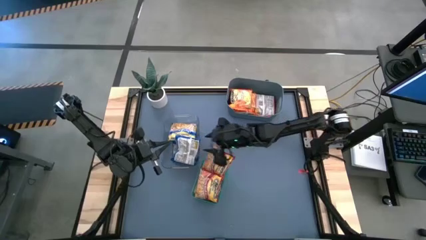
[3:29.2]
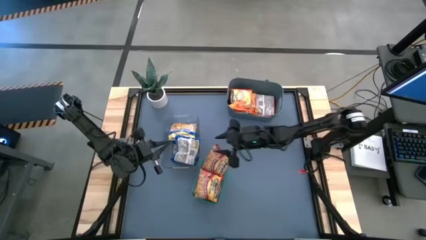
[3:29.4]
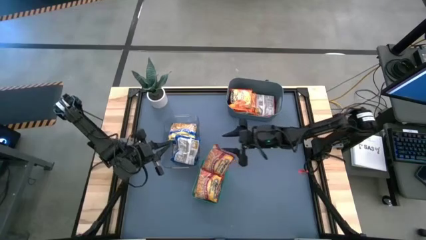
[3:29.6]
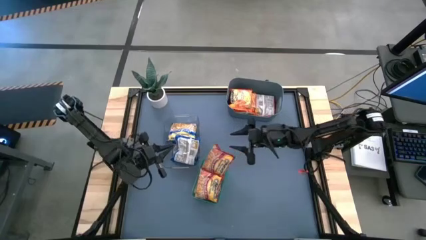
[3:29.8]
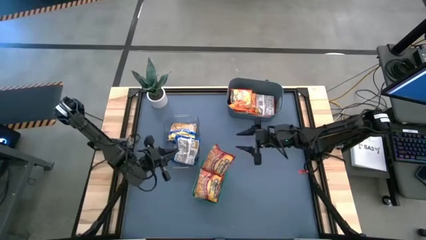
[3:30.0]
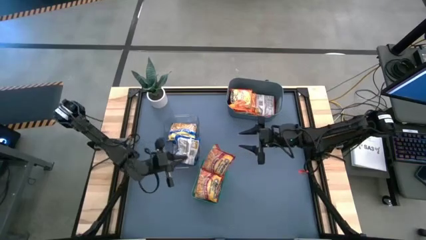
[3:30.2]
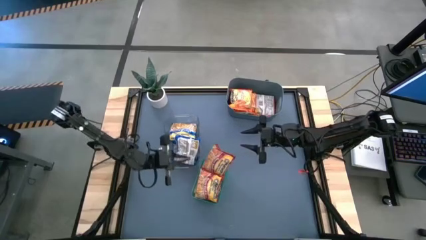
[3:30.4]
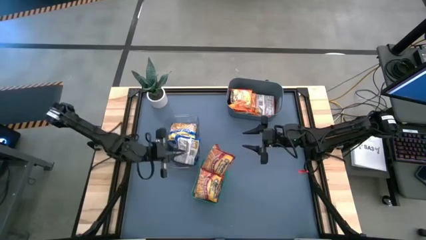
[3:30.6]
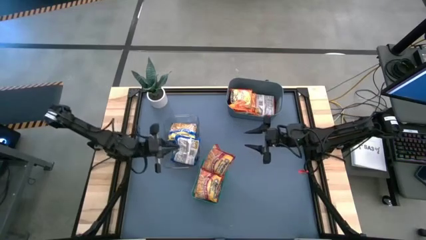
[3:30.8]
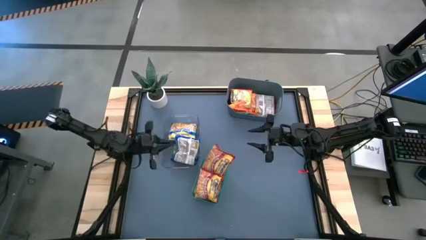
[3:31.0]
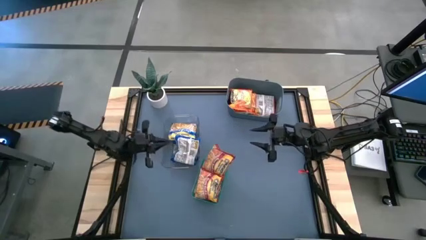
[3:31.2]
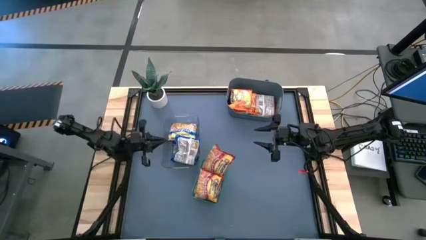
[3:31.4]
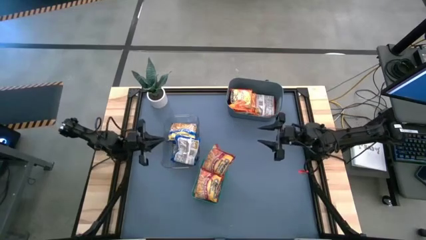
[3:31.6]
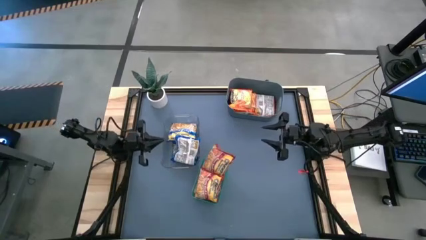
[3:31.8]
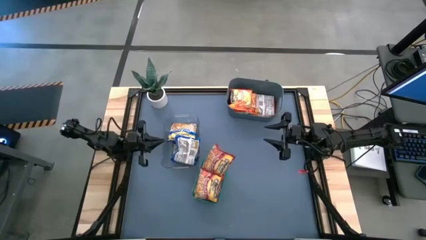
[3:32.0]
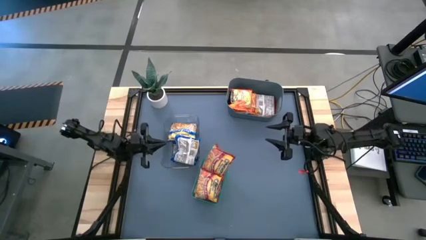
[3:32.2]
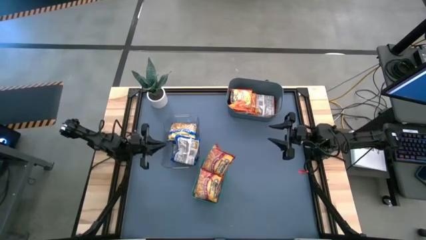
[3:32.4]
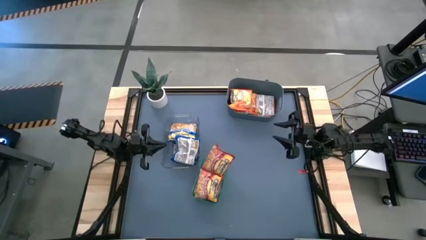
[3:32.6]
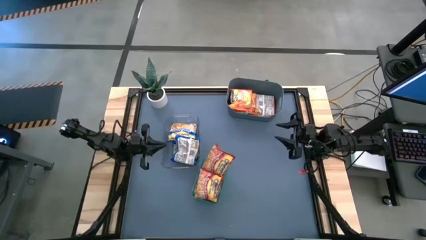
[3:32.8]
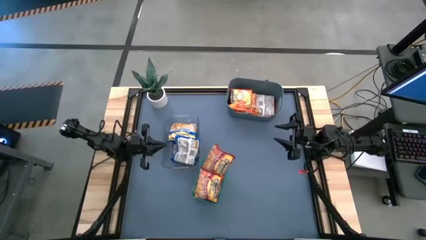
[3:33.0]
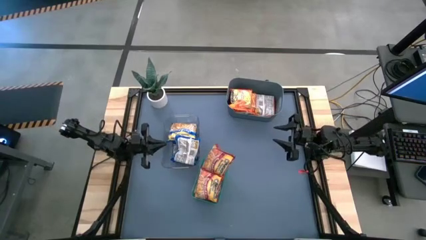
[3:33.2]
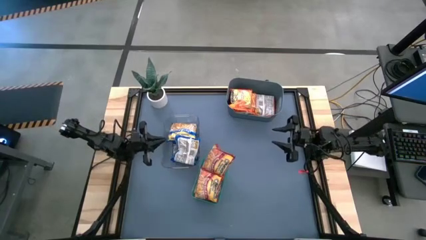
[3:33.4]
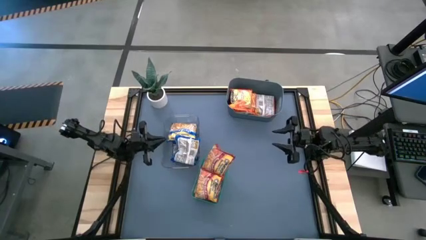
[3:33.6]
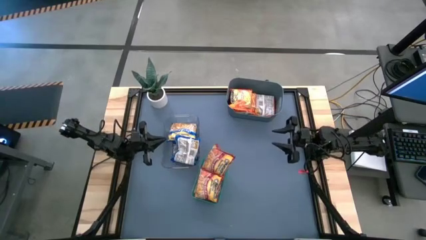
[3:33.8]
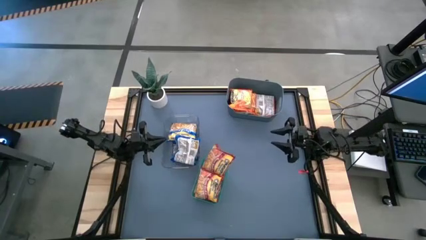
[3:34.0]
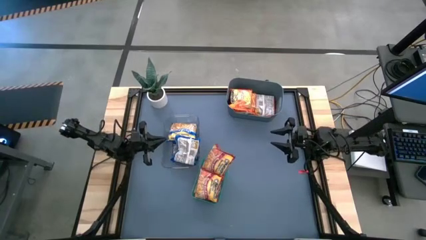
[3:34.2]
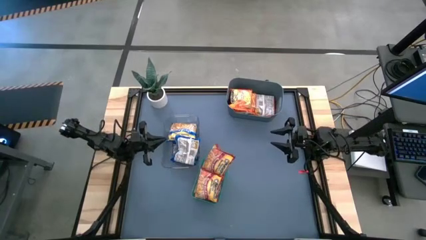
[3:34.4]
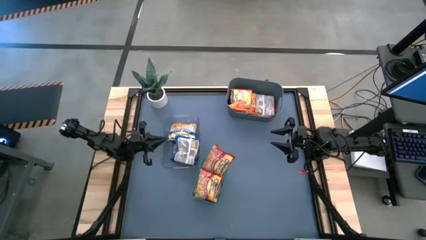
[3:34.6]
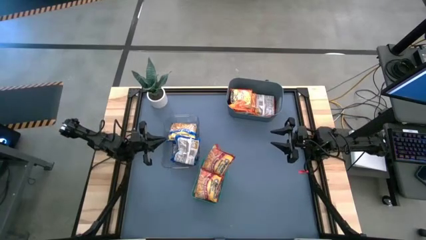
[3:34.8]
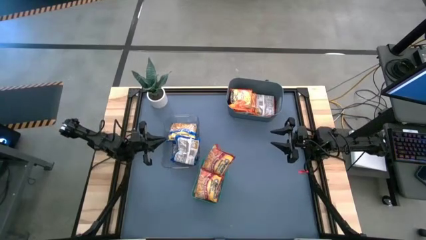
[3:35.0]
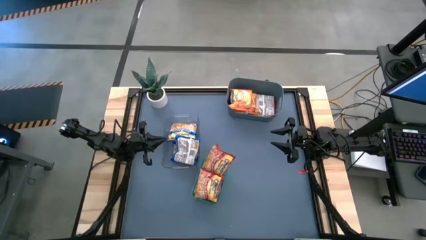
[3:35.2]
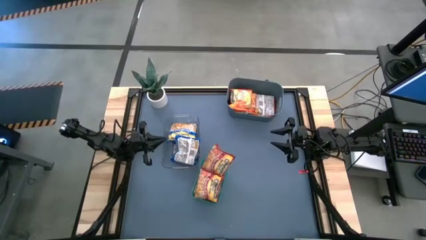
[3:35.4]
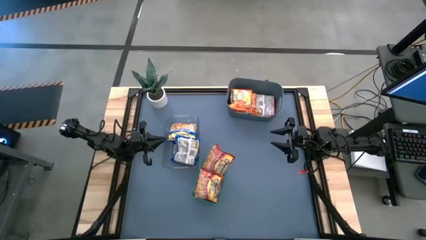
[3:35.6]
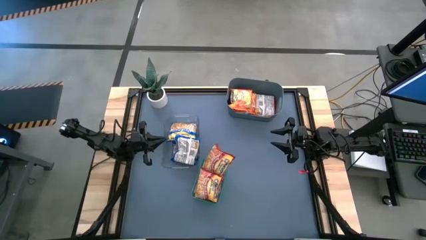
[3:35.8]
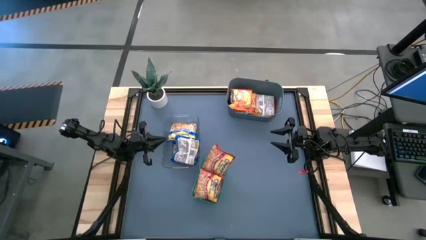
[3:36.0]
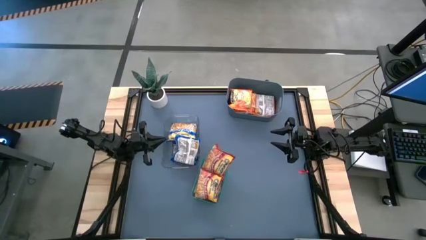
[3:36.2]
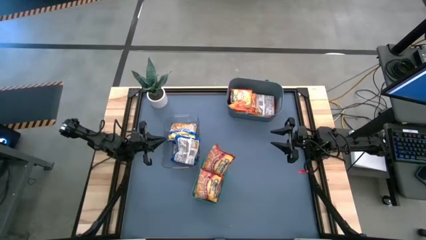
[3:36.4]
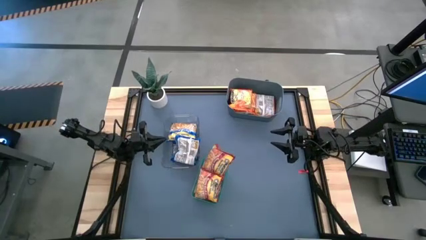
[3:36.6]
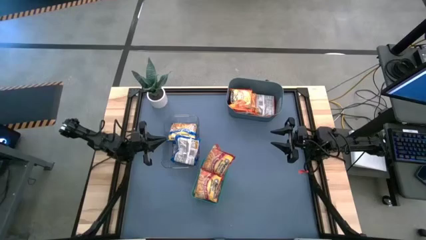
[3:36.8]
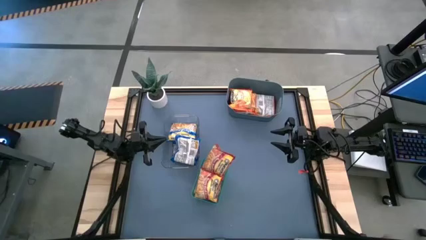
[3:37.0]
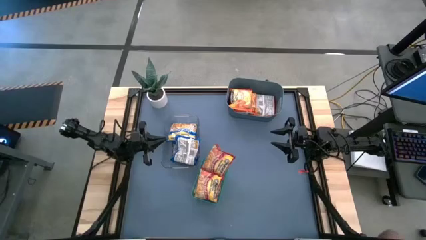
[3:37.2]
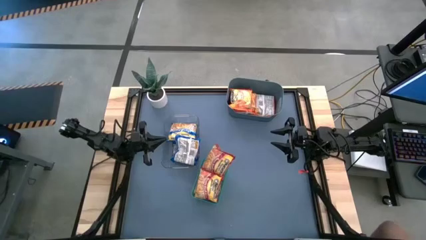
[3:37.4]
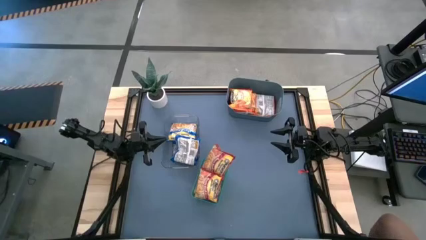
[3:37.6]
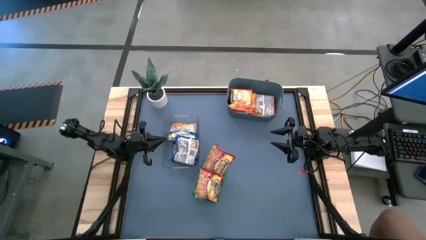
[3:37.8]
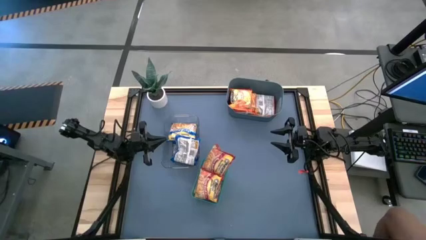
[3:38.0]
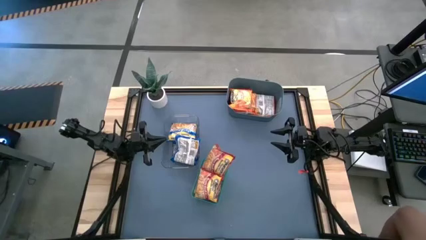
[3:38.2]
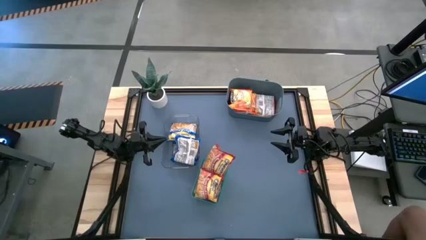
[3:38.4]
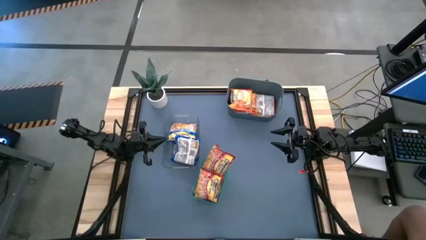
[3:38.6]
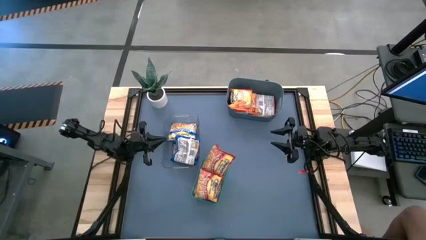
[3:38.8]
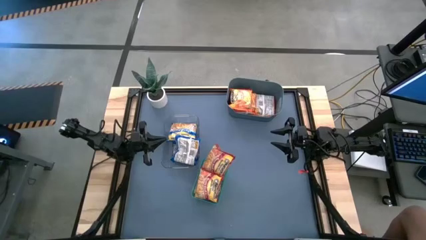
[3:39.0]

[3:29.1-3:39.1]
Task: Sort Maruchan noodles
Return to Home Position

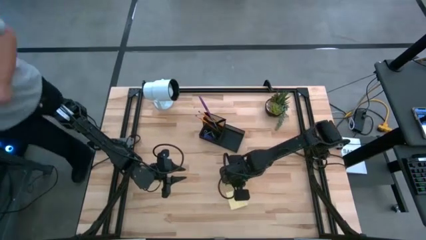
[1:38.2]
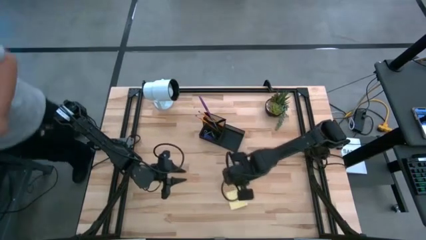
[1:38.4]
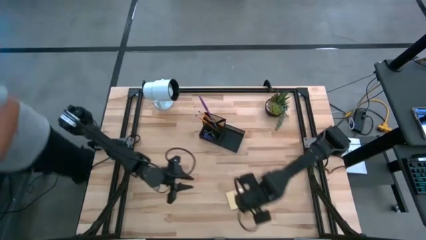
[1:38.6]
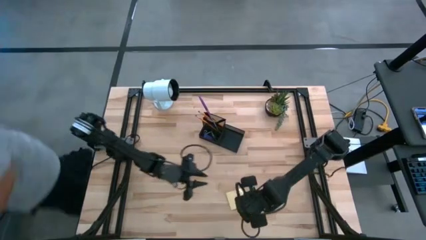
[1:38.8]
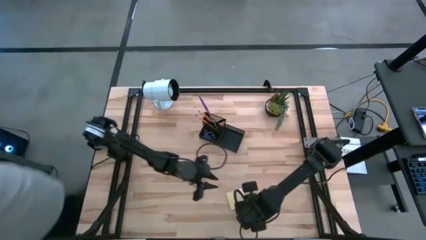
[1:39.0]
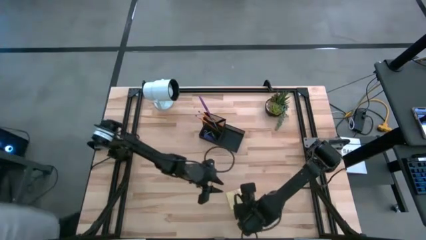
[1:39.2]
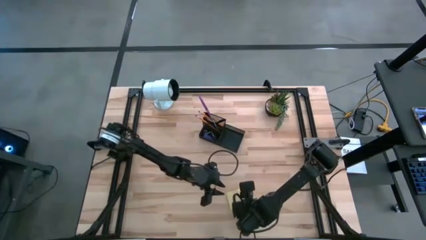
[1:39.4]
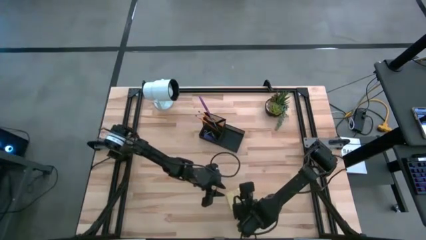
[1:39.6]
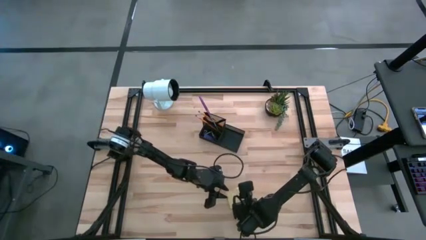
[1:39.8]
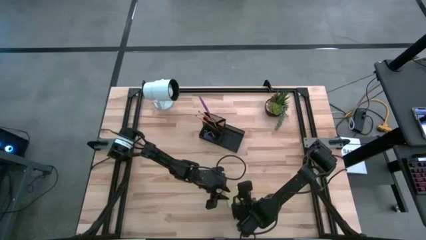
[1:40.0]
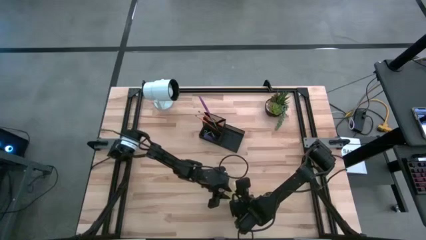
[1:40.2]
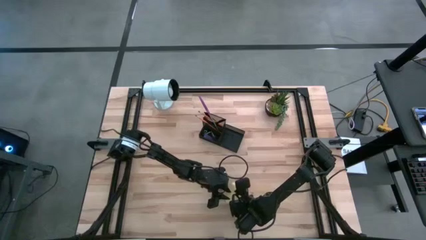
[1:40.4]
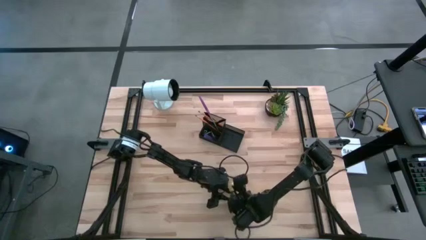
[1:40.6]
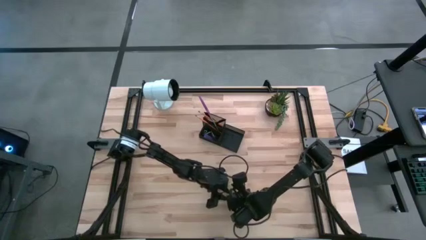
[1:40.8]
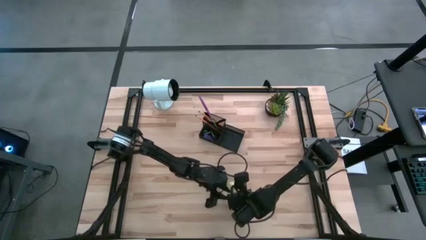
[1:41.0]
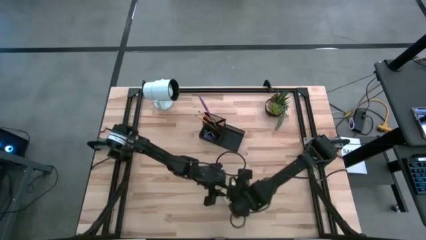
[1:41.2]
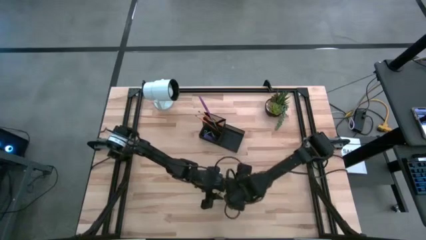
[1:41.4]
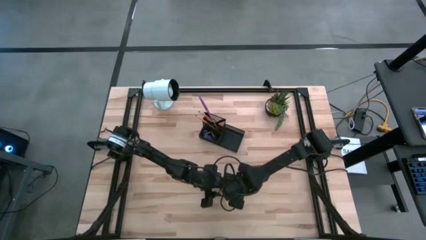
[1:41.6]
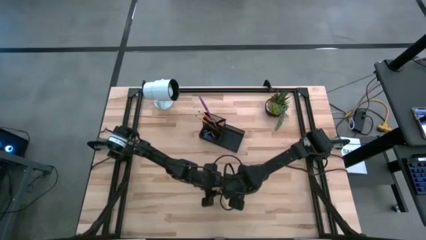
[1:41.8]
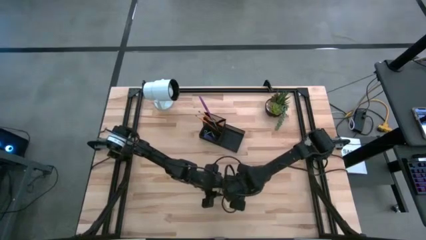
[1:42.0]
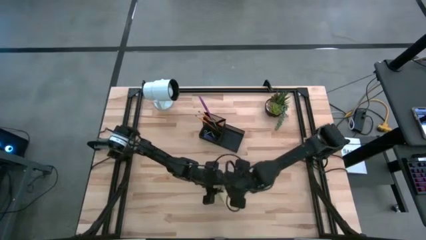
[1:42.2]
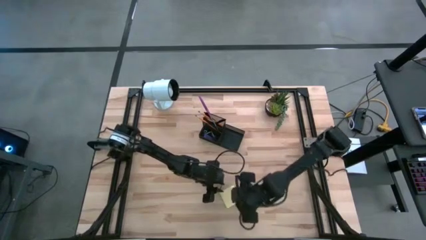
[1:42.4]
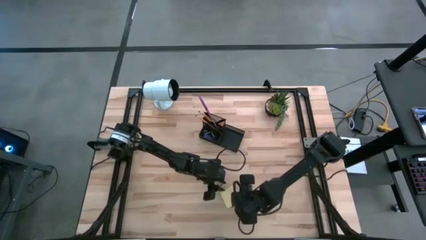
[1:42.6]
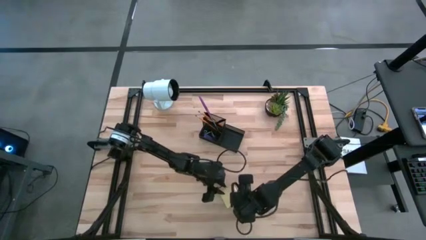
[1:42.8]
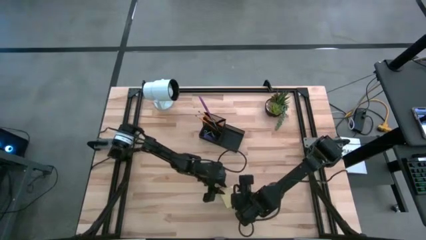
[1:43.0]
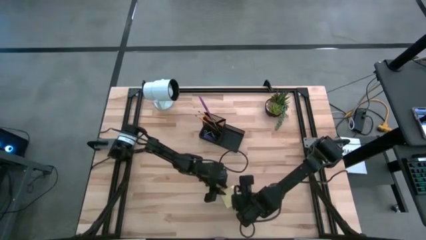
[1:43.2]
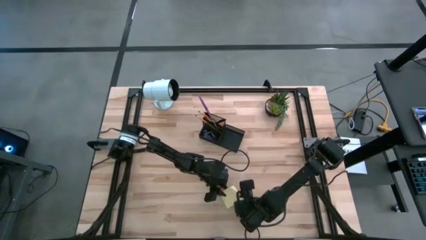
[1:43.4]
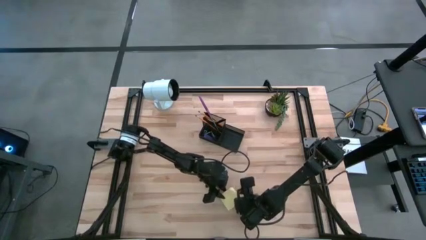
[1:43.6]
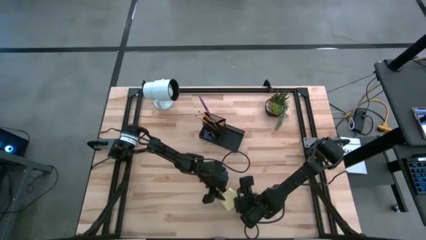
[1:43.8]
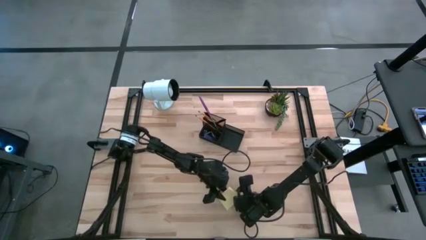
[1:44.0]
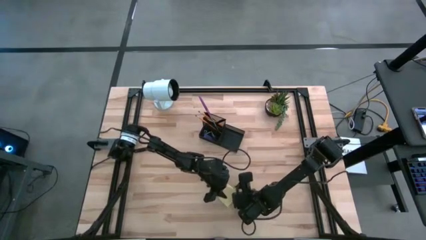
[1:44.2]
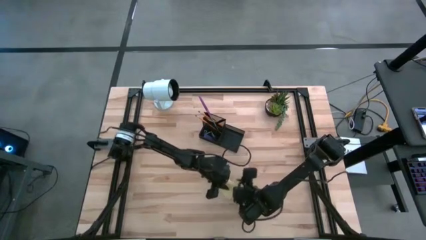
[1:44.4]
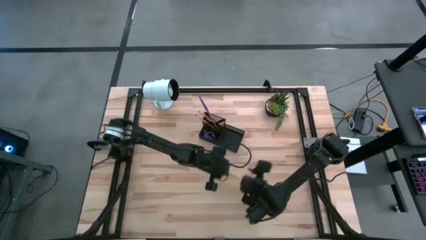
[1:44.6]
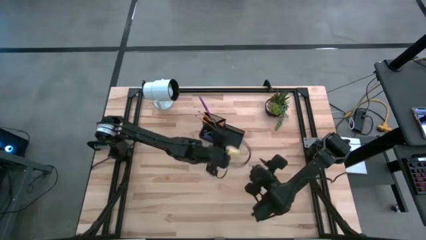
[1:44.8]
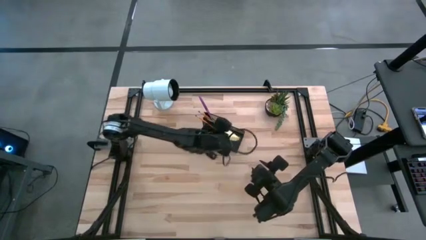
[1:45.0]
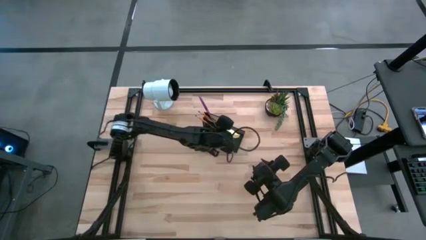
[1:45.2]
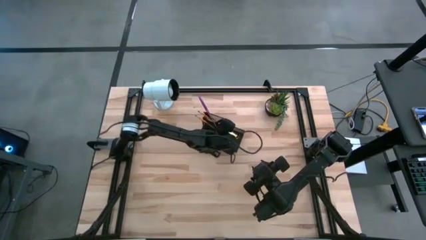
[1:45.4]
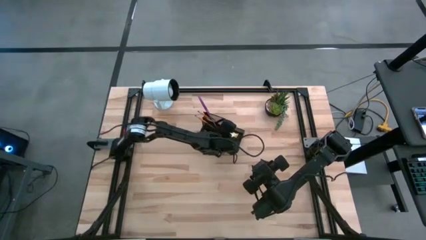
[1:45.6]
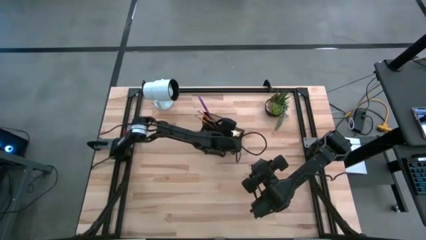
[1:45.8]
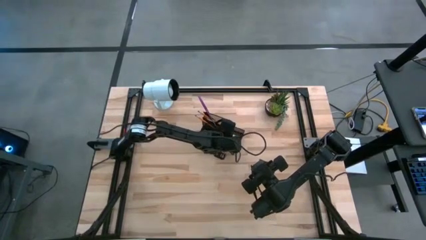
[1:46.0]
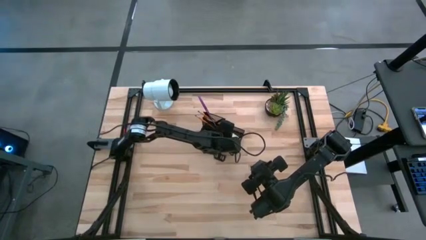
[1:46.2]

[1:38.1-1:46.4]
Task: Pick and place office supplies into organizer
Put the yellow sticky notes into the black desk organizer
